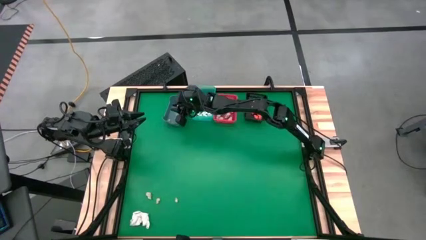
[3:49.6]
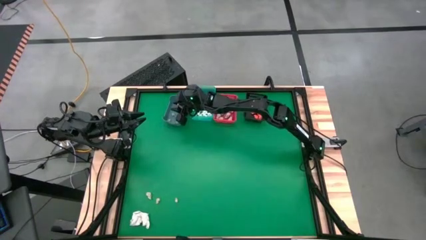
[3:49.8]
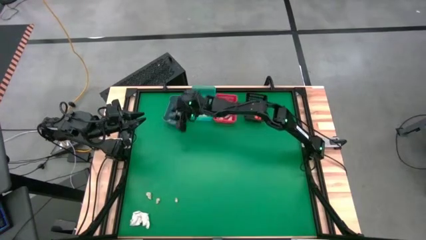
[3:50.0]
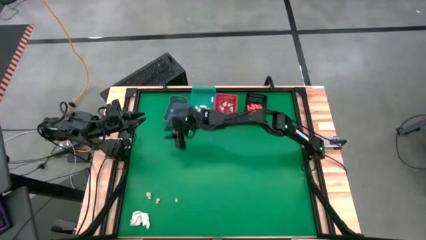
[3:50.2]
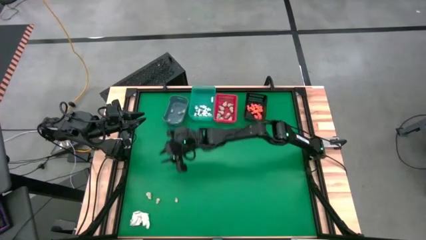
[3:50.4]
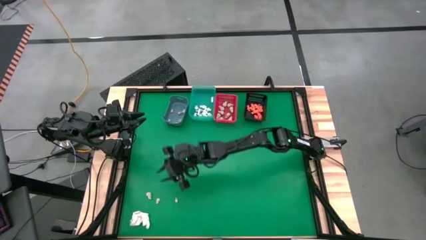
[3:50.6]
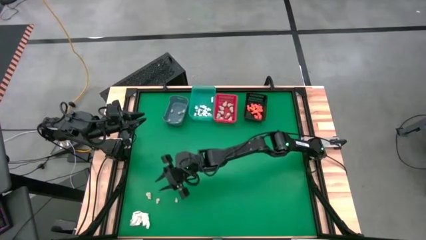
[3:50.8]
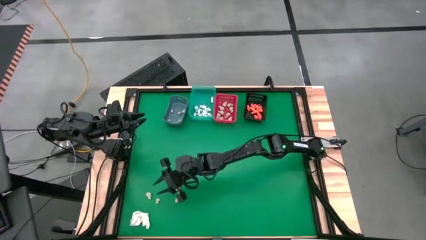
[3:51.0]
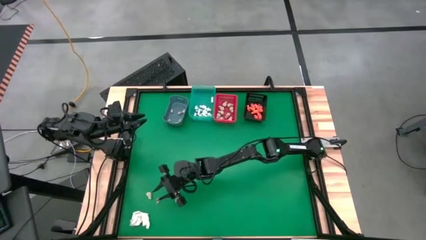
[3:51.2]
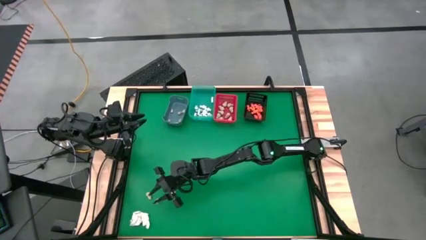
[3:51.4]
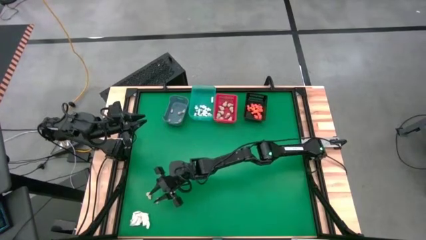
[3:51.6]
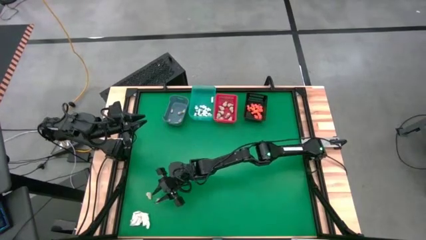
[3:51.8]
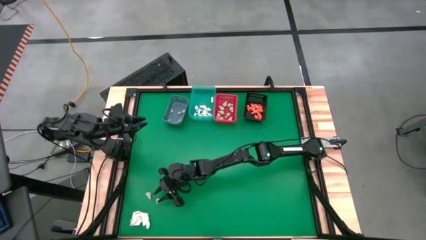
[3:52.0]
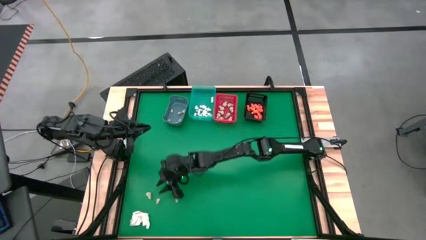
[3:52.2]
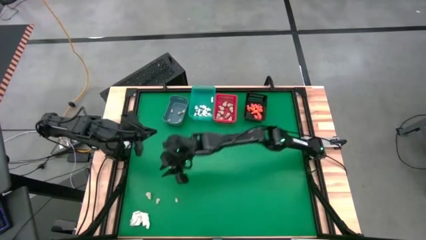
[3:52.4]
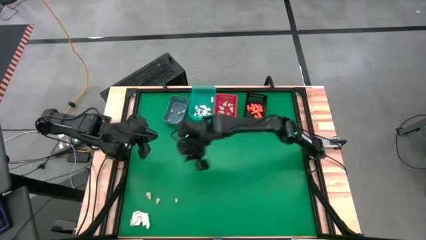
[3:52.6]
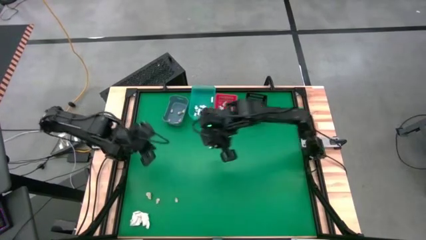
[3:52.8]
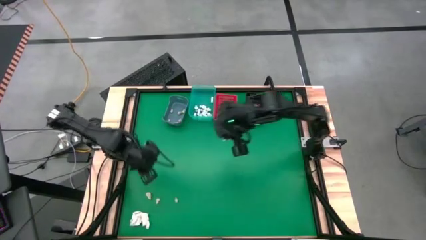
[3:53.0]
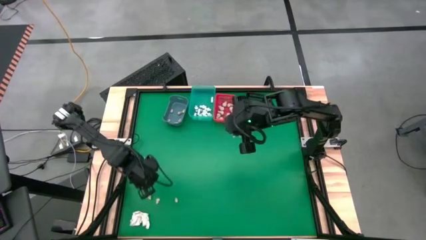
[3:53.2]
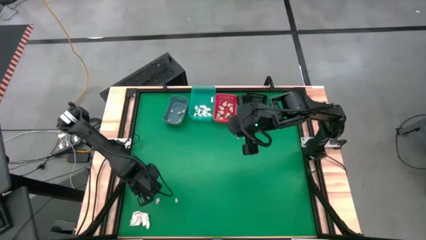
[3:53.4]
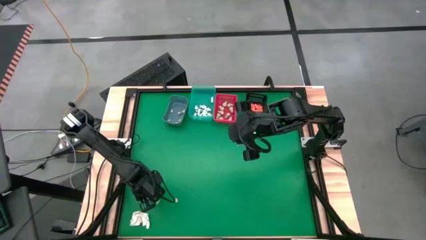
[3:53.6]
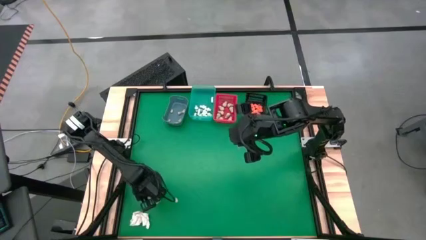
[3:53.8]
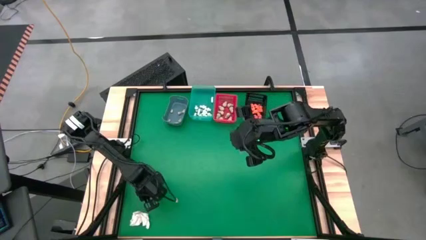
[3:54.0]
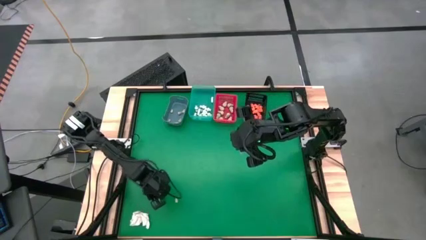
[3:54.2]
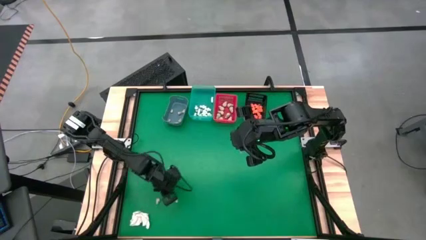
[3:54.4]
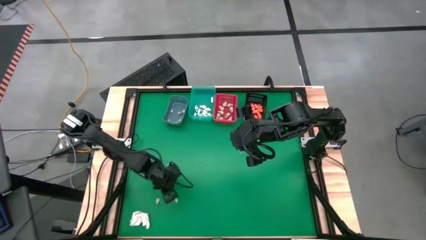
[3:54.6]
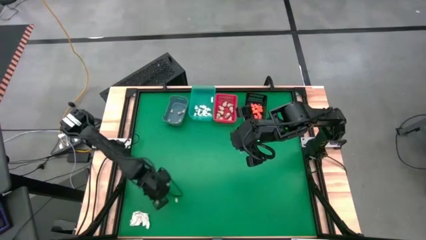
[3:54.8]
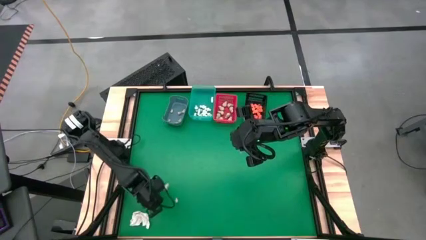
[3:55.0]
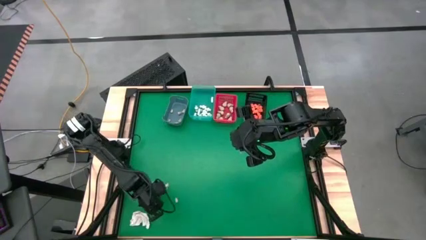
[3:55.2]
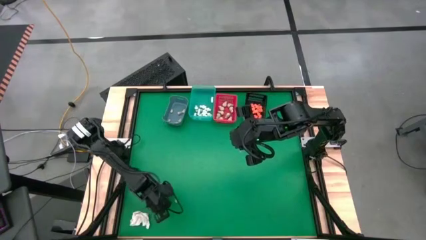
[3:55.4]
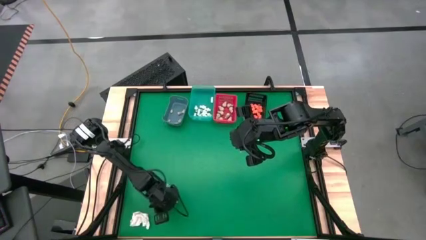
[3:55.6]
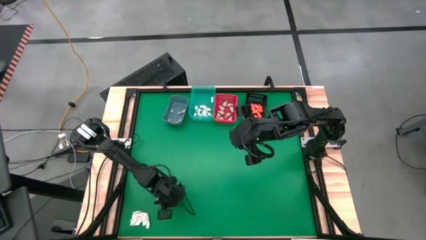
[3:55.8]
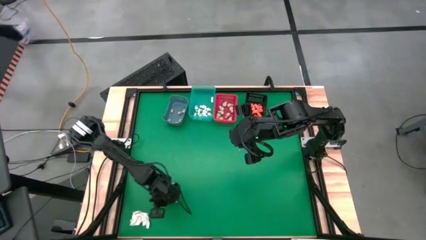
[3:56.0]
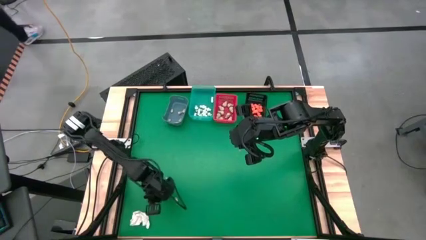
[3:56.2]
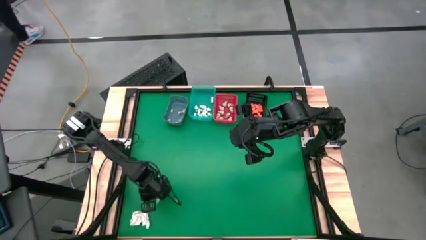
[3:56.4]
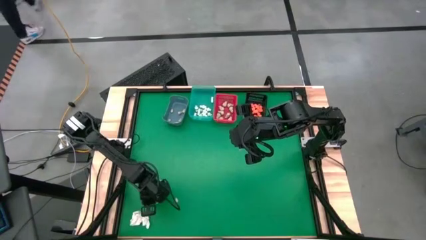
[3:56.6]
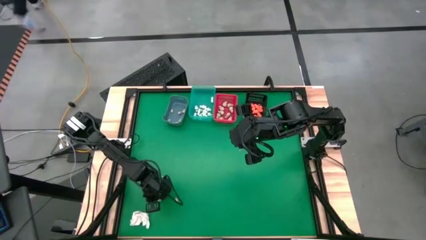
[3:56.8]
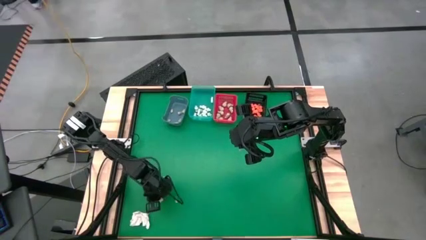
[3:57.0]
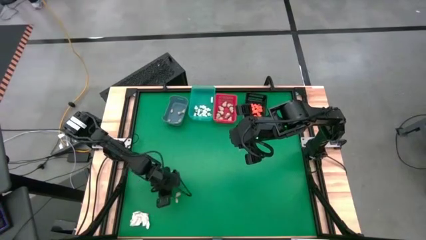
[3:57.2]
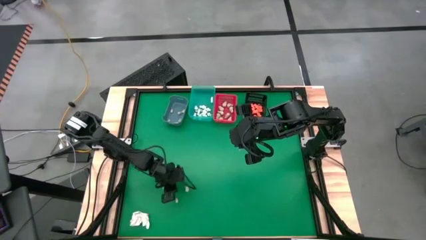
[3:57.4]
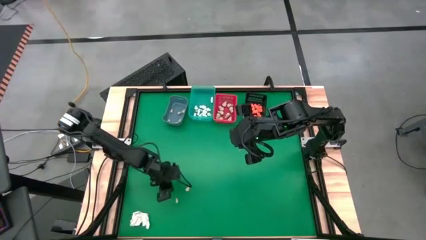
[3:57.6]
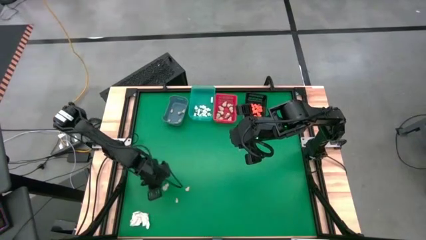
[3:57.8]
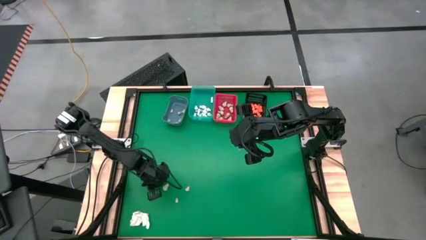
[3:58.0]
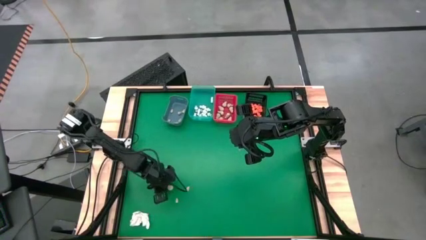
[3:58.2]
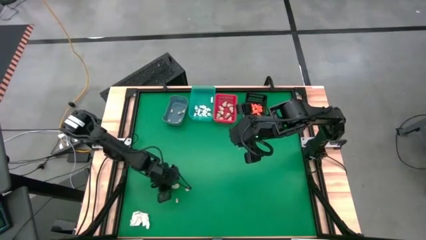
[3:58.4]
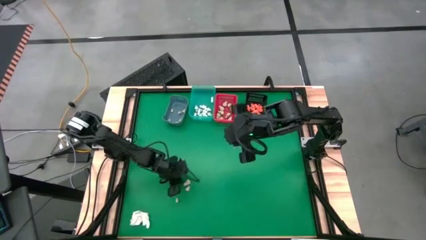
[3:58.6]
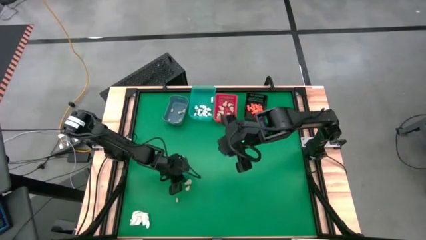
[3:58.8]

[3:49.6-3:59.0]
Task: Sort Halloween decoration
Move the toys to the center of the table

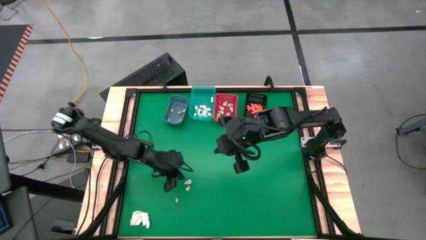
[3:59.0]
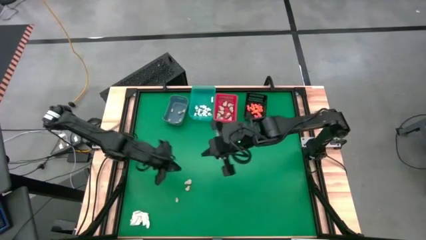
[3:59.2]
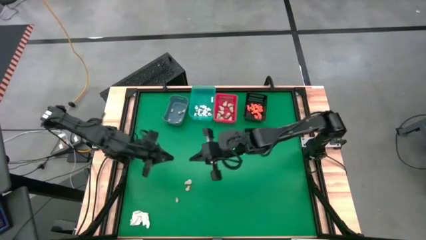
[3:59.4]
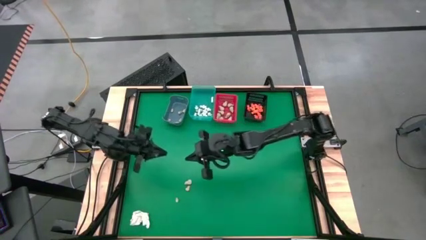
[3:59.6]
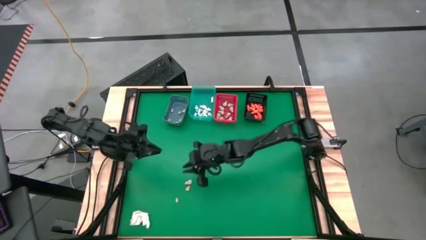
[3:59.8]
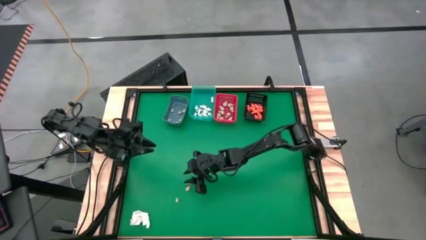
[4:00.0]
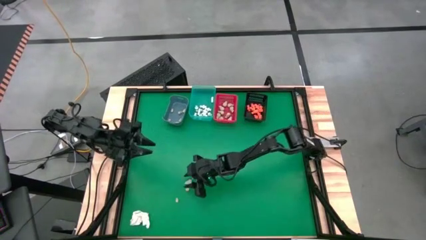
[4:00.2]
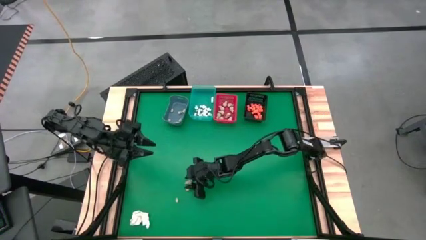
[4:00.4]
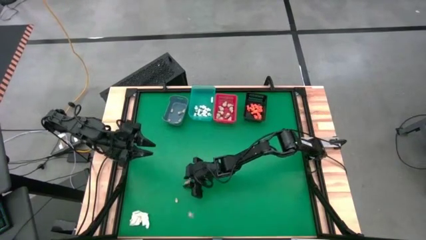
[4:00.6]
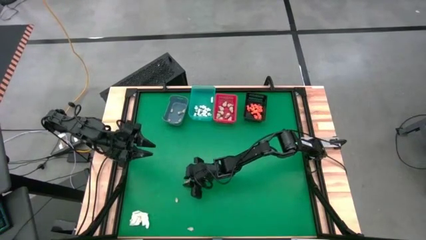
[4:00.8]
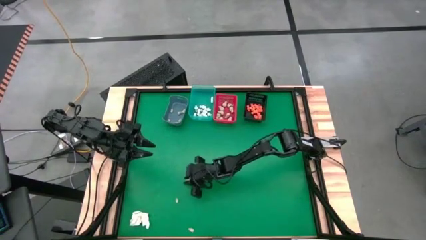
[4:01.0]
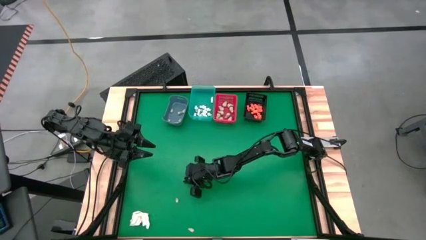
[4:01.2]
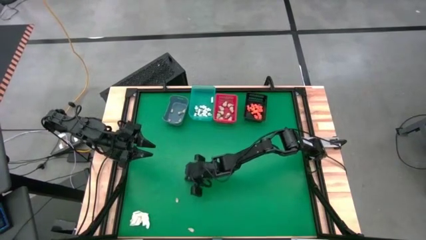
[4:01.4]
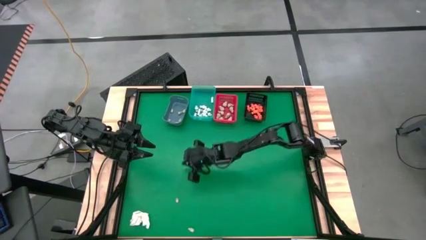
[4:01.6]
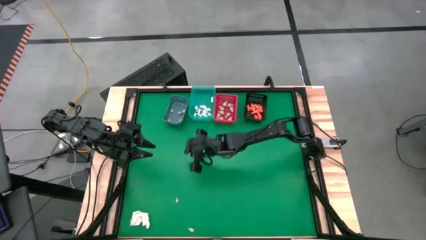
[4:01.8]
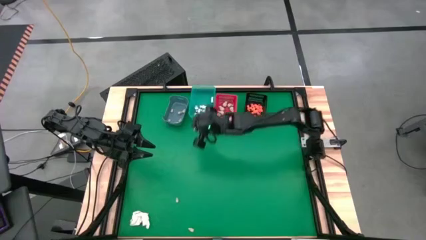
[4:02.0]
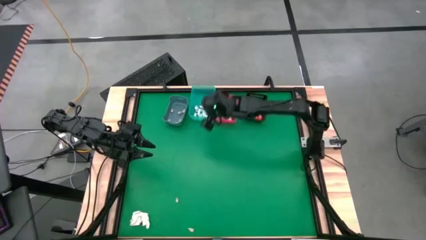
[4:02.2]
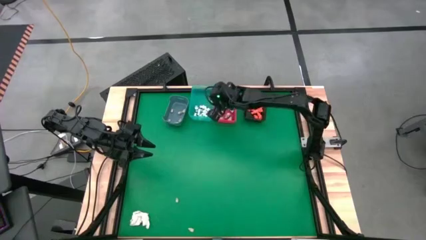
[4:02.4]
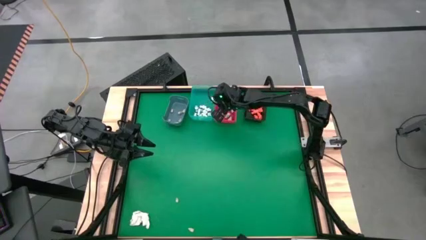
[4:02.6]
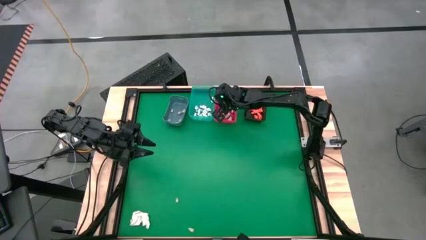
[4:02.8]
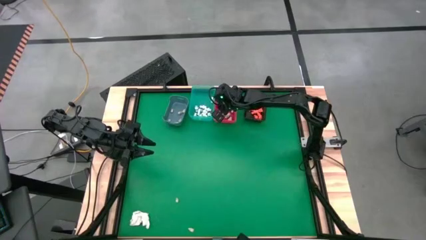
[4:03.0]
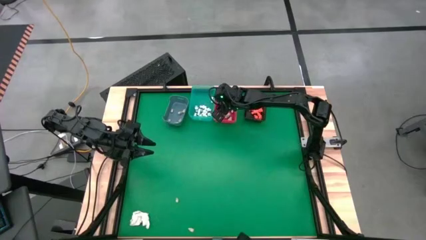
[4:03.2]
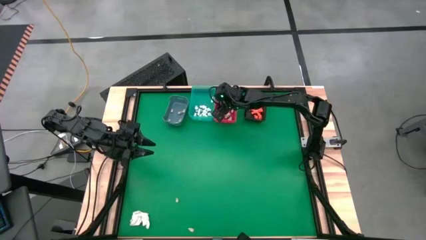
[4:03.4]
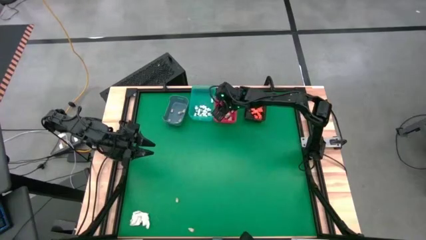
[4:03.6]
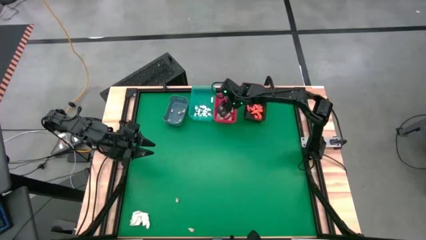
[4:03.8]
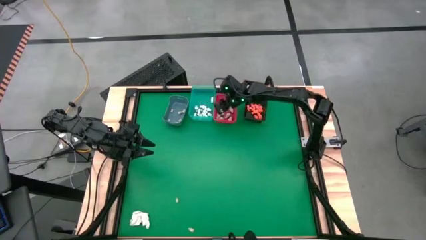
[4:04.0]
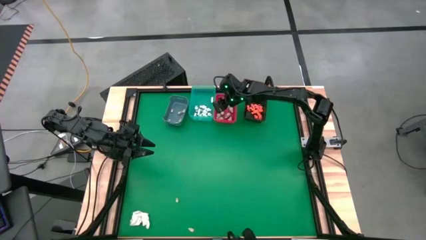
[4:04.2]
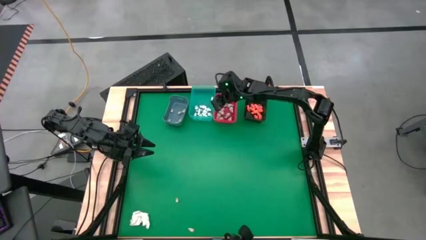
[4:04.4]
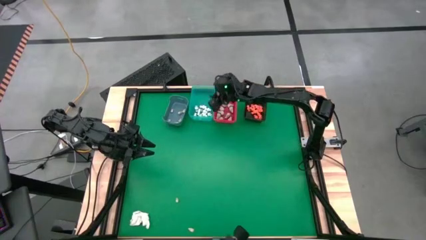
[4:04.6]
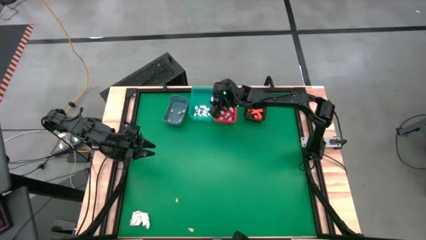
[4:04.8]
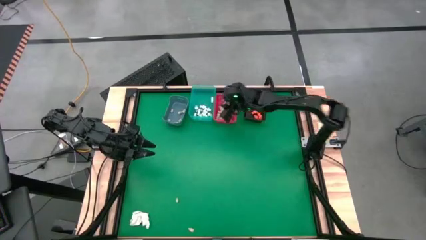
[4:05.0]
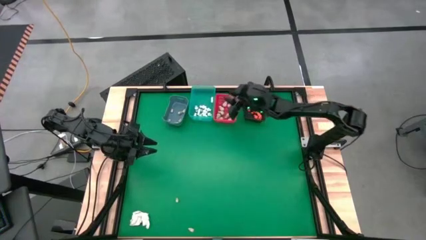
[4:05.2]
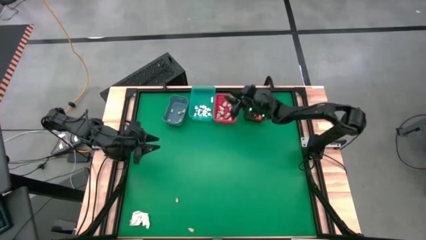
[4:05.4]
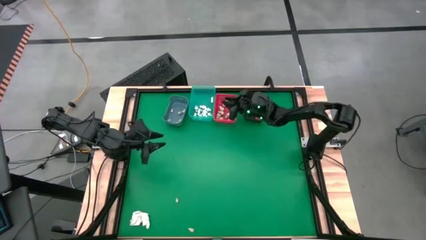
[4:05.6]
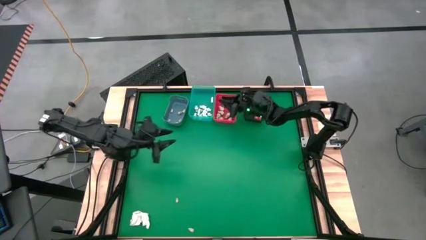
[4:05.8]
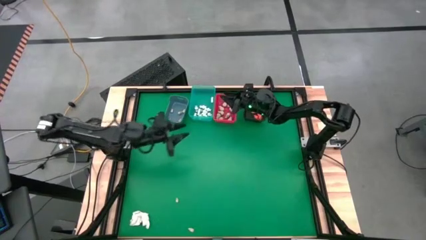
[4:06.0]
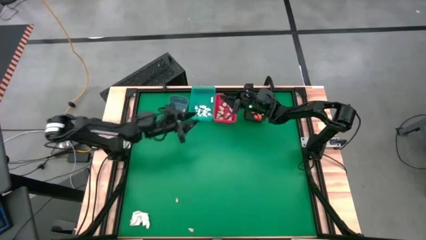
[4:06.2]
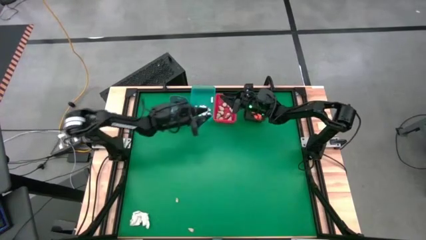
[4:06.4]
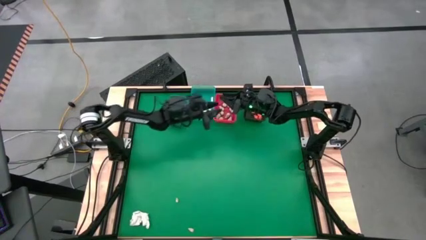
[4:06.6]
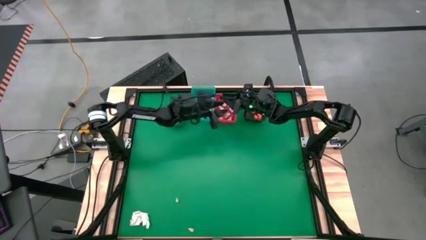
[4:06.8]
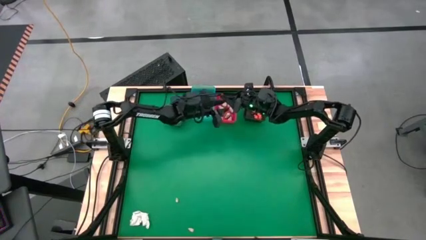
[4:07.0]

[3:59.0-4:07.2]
Put the white skull toy into the red bin
